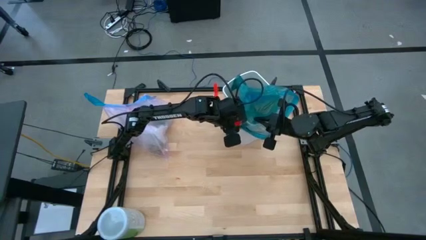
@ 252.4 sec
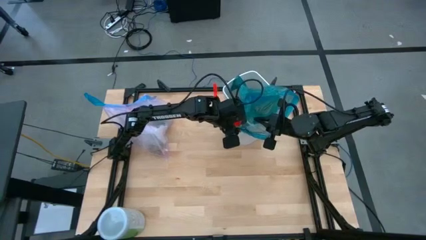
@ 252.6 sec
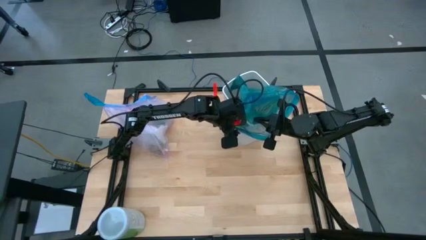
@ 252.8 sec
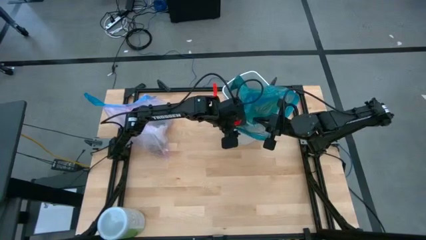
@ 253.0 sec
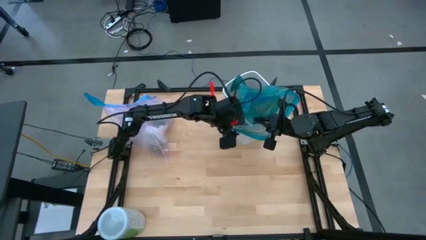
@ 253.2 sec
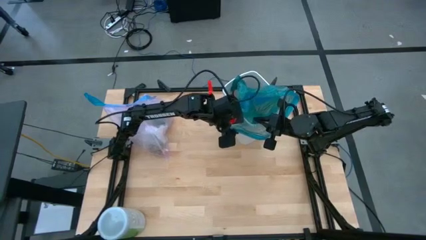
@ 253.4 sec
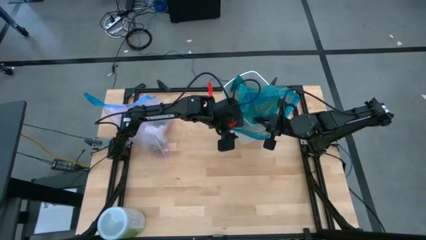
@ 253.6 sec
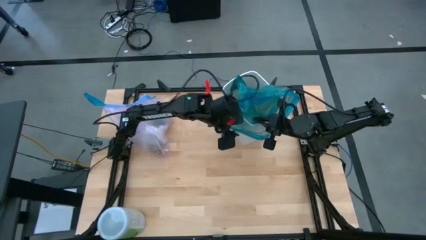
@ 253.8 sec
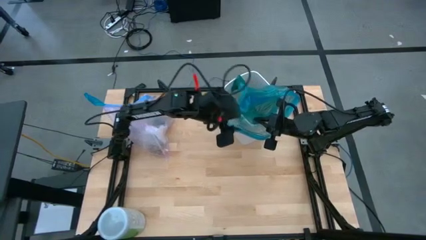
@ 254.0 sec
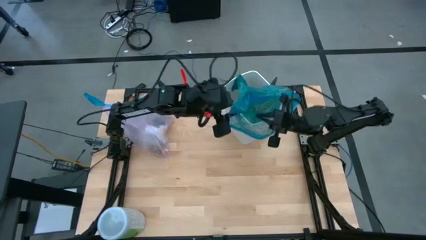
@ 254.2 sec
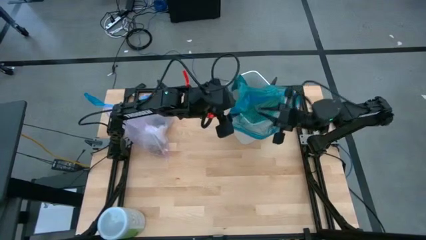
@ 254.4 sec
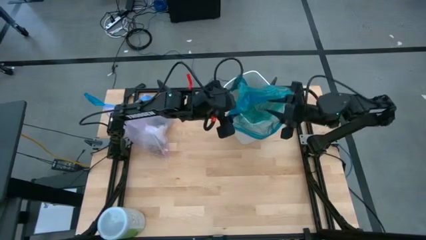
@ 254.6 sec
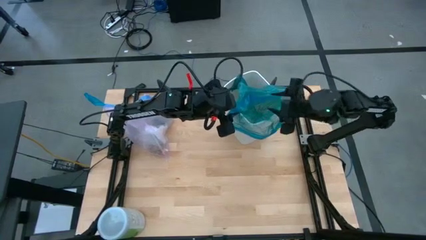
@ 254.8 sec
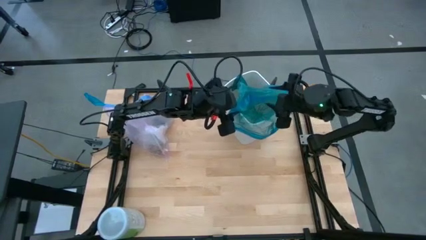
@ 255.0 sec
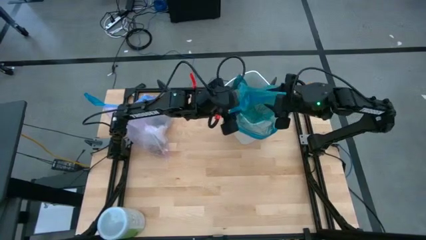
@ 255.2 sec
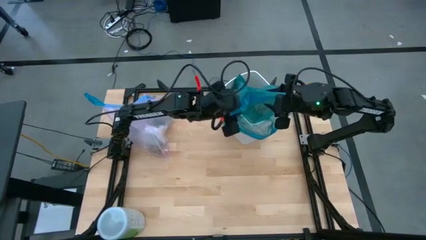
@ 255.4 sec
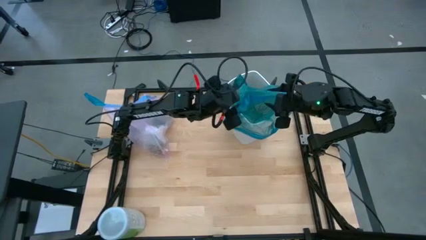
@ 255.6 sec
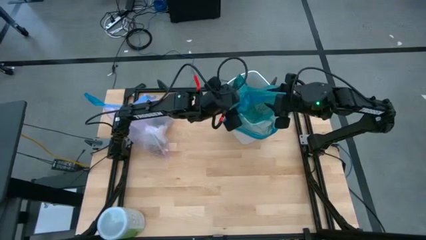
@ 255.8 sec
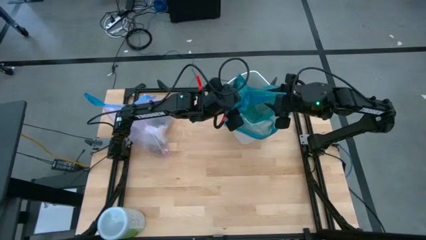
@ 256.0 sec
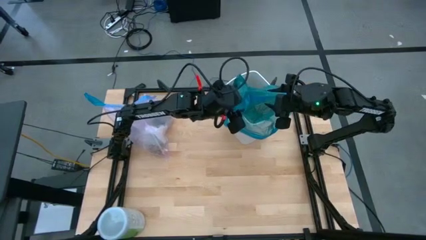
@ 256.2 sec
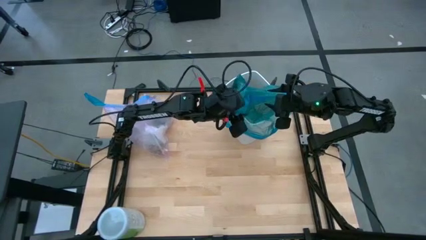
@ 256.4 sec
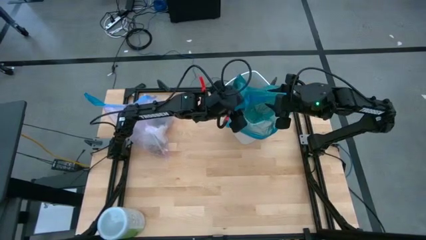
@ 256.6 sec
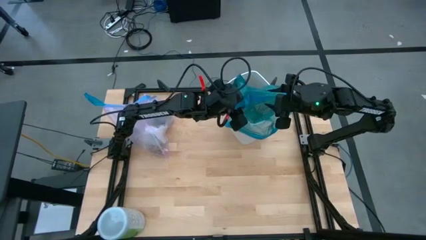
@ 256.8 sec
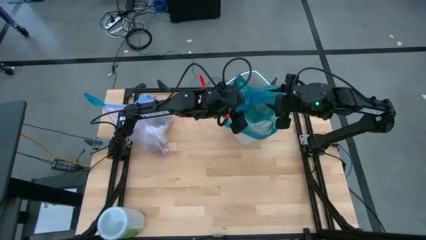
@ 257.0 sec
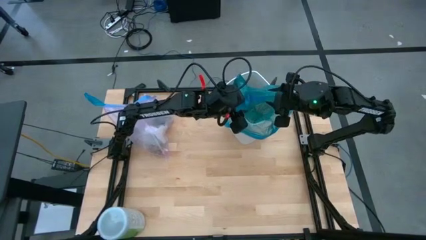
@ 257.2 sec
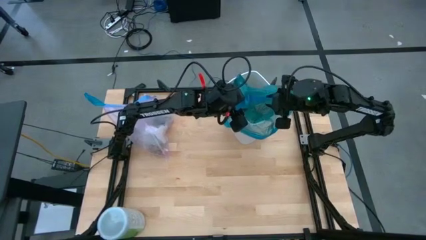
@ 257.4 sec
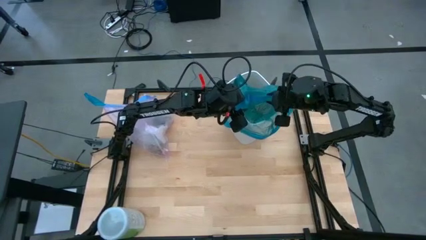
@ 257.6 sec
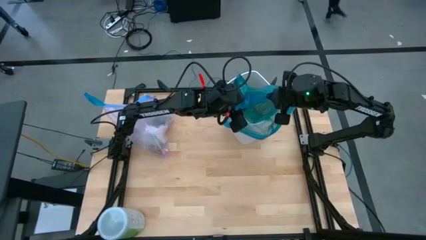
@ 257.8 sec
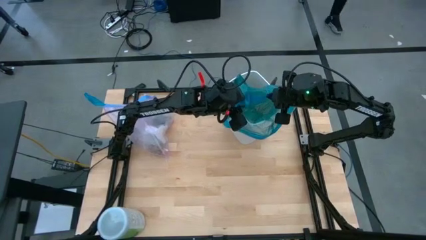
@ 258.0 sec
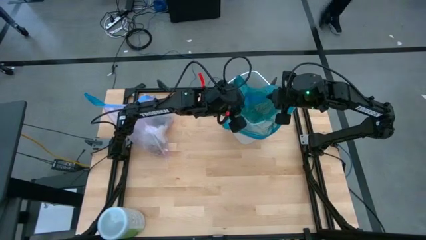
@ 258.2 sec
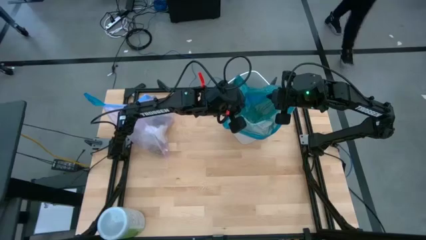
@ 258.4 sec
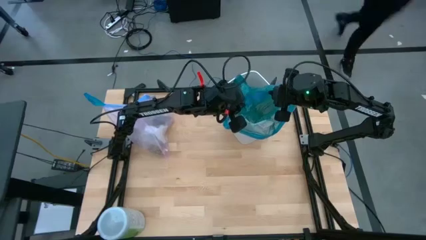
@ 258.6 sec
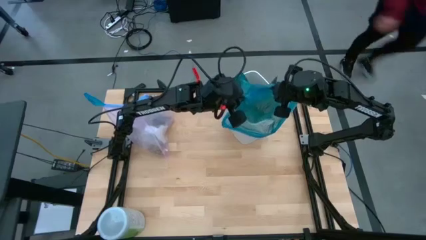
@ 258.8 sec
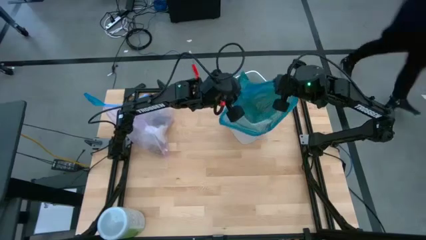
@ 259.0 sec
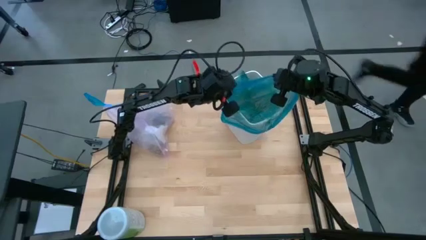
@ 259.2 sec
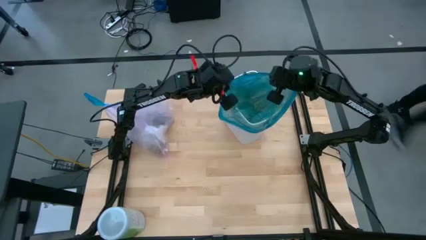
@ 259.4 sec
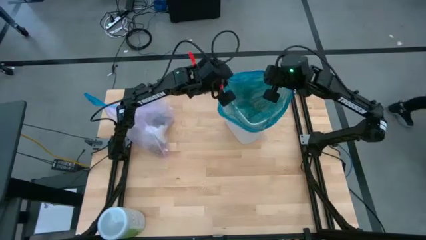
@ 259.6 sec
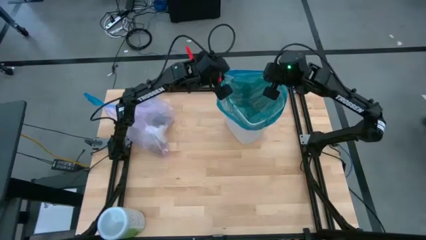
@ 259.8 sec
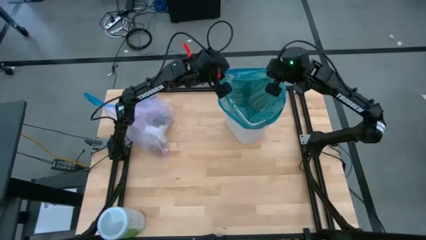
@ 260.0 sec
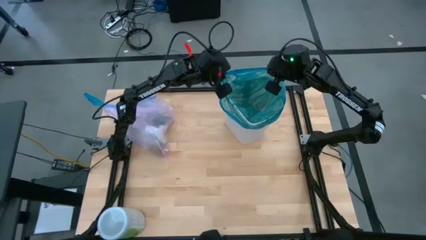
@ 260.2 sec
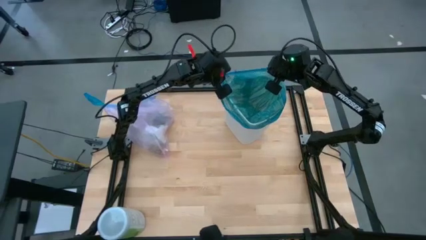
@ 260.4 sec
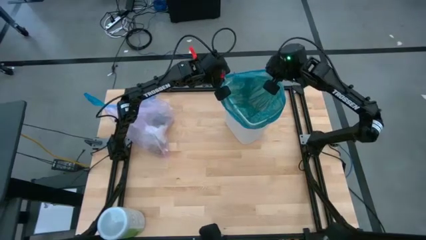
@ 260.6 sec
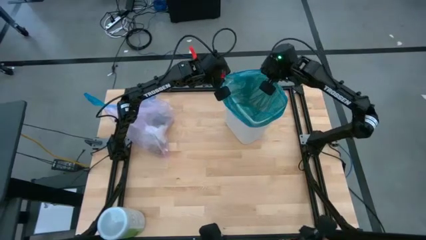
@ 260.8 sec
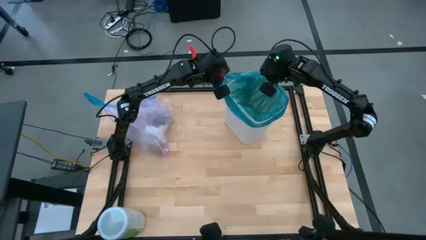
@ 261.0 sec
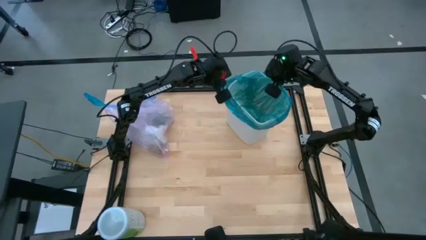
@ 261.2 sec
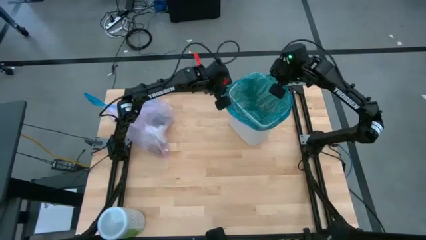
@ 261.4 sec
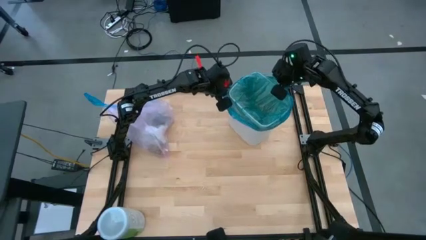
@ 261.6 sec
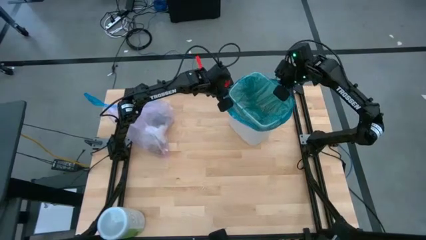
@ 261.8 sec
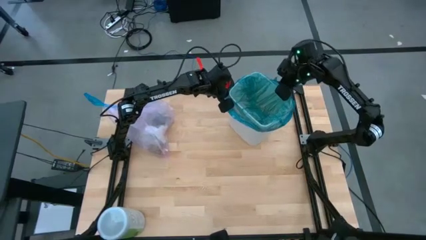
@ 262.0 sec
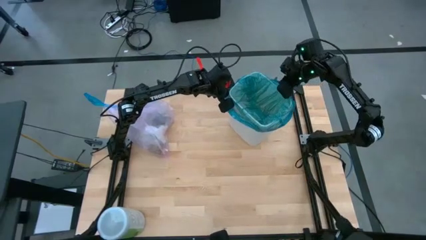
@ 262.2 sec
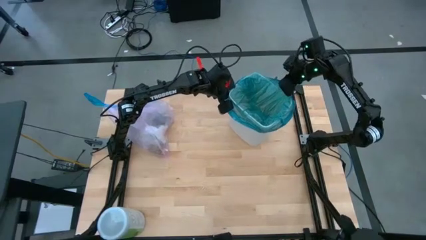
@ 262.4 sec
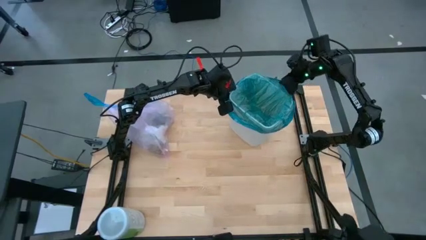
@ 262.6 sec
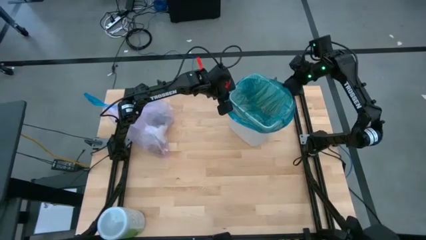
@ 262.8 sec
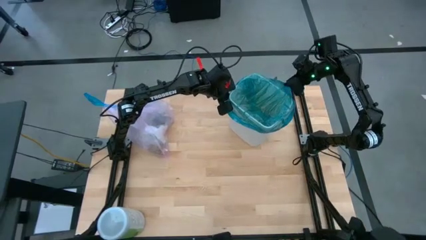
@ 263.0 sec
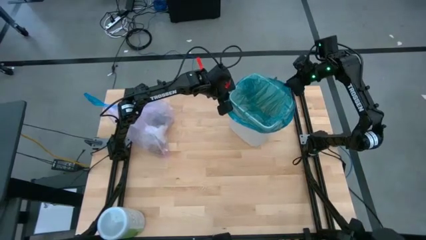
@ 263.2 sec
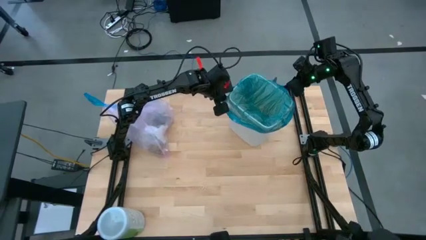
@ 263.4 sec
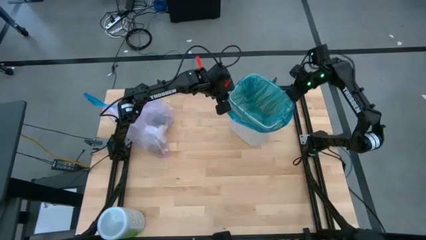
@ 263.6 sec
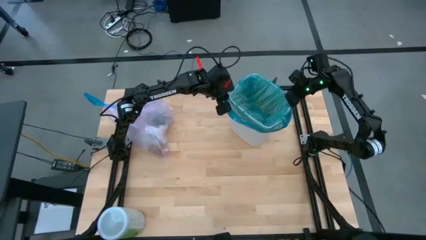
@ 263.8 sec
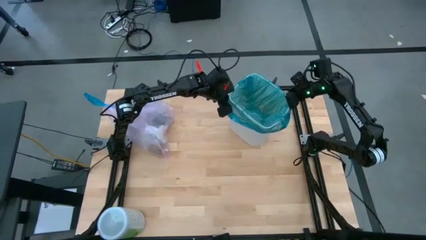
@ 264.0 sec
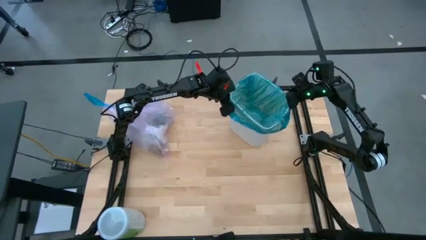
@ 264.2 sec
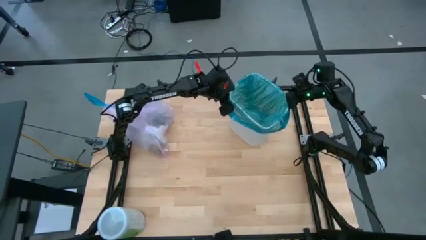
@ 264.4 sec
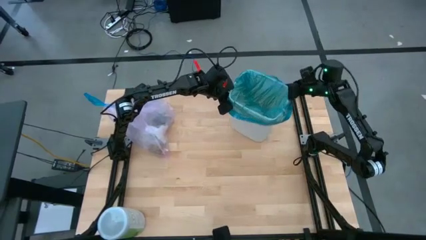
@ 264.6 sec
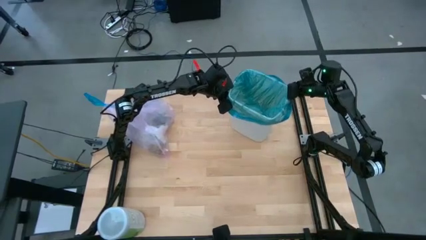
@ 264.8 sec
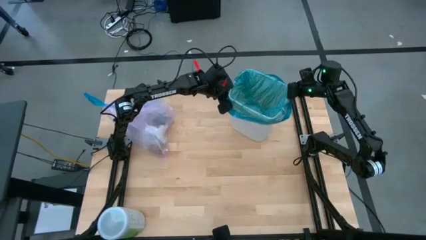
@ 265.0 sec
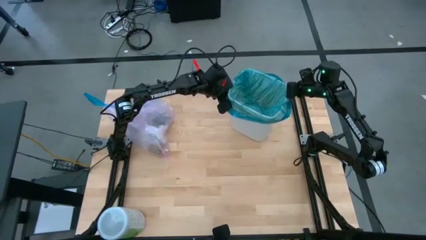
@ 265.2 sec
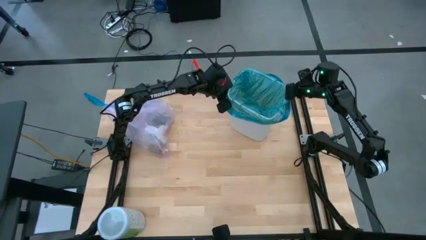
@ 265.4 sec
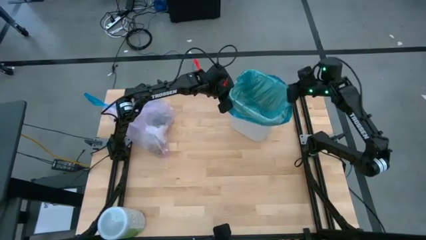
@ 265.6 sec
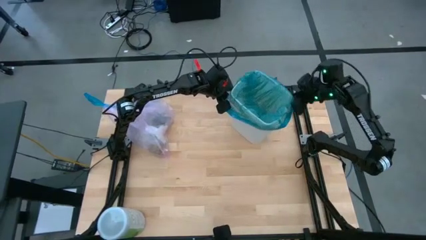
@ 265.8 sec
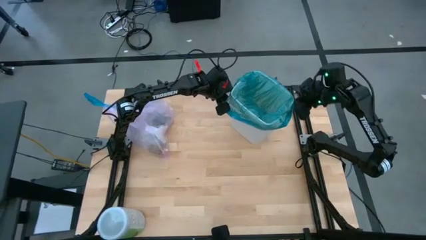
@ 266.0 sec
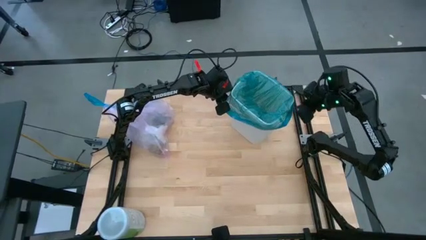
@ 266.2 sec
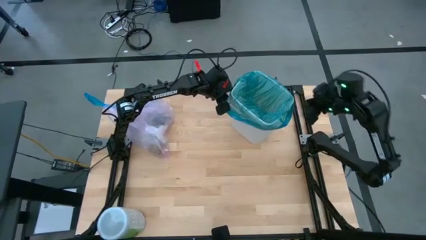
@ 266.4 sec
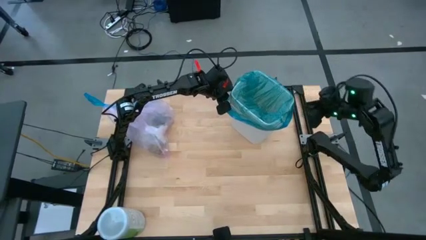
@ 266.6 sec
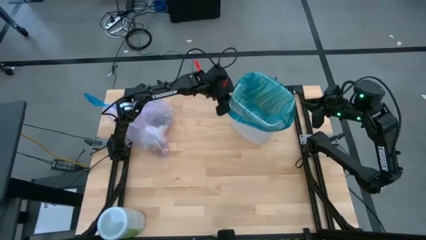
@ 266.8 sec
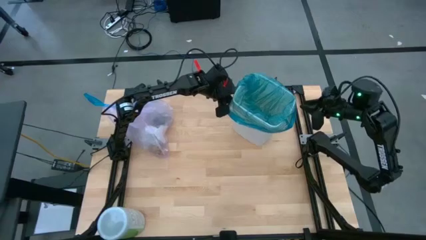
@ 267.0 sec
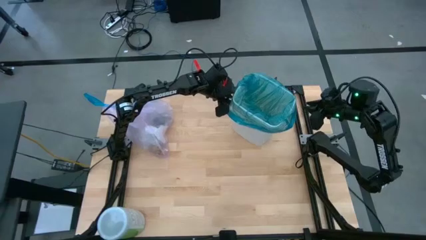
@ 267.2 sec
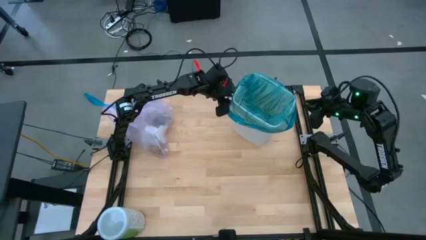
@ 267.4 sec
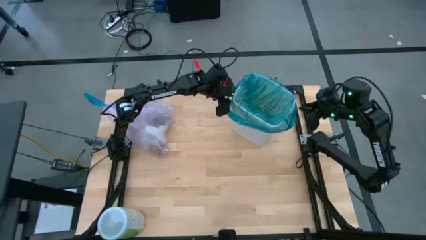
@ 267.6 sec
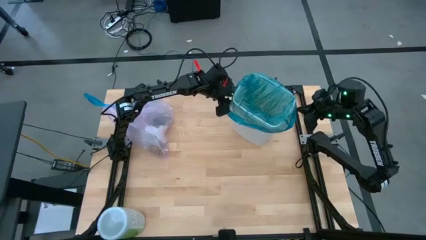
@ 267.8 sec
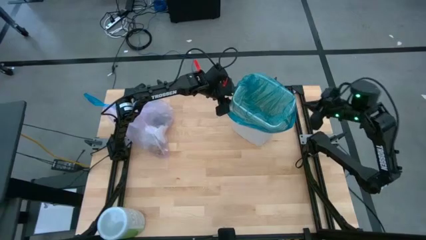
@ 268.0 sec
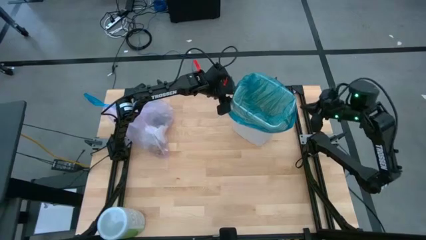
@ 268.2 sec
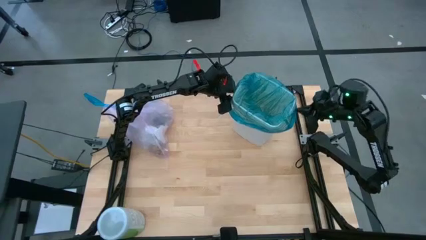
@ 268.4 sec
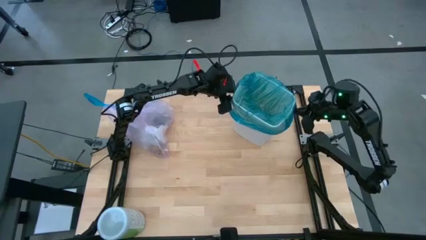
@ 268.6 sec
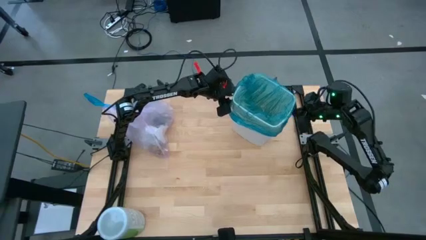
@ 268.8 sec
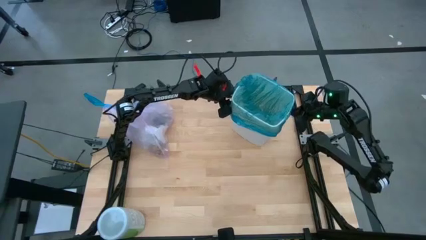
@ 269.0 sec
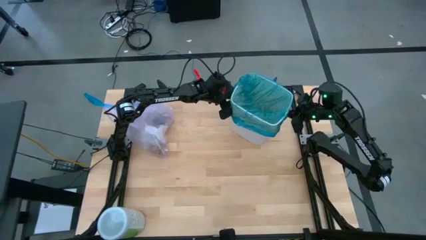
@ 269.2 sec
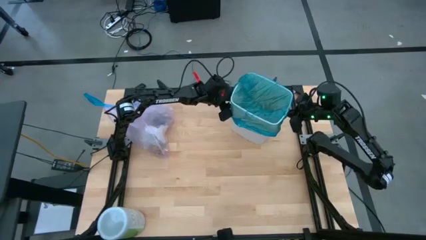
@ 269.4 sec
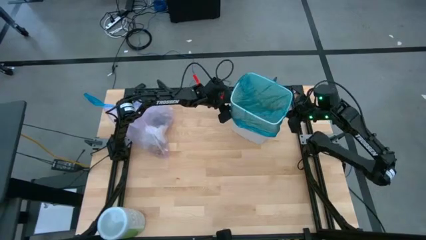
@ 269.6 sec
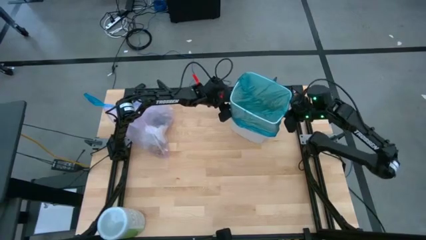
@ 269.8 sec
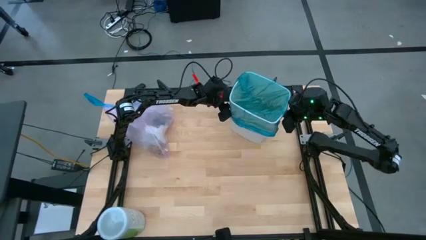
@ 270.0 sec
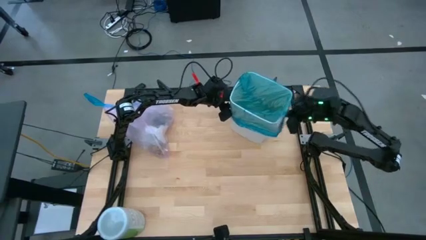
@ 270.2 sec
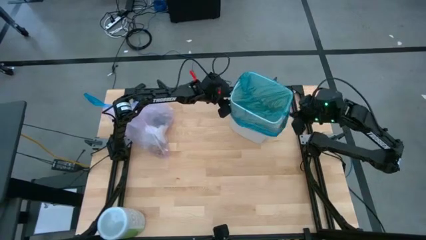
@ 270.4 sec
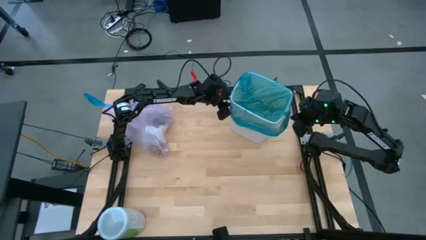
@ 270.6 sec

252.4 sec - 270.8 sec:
Task: place trash/remove bag and relplace
Put the blue trash bag into the white trash bin
